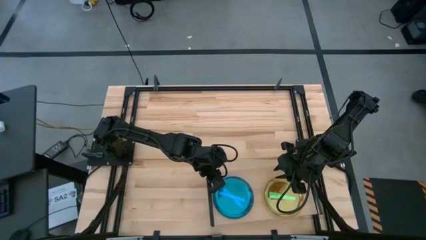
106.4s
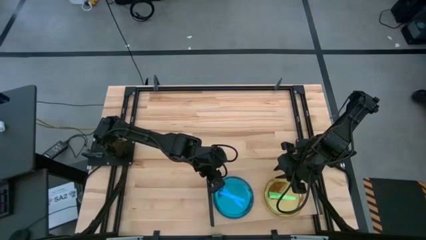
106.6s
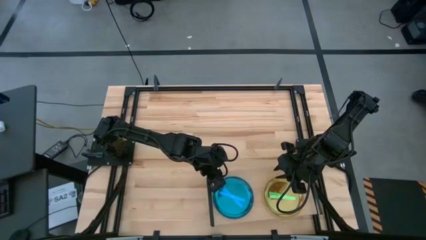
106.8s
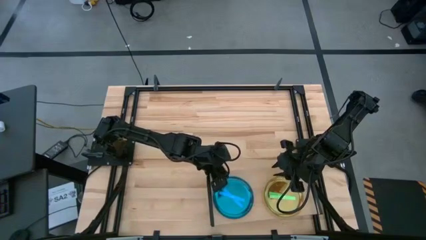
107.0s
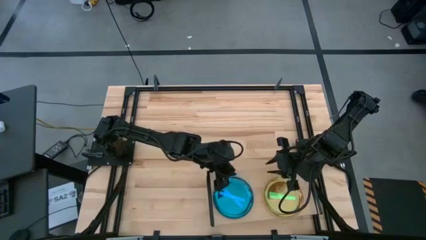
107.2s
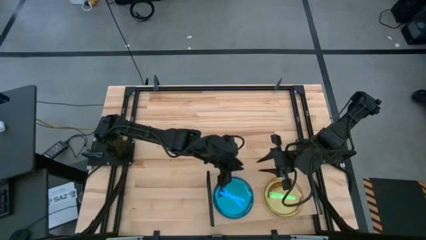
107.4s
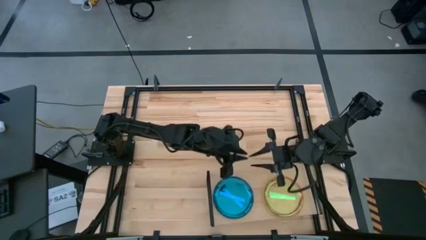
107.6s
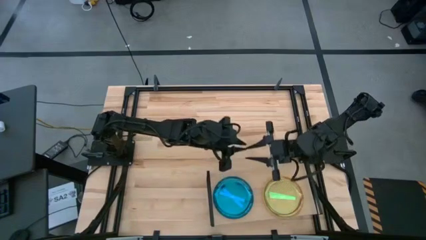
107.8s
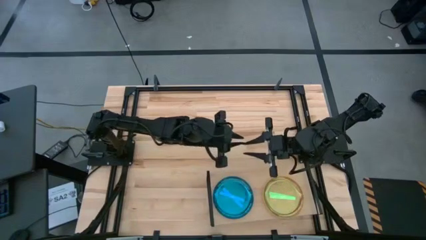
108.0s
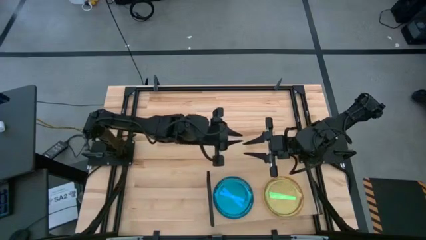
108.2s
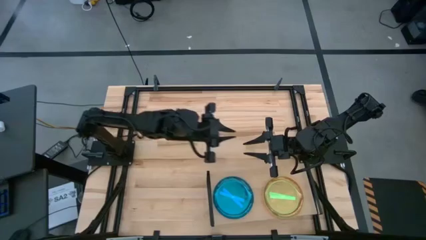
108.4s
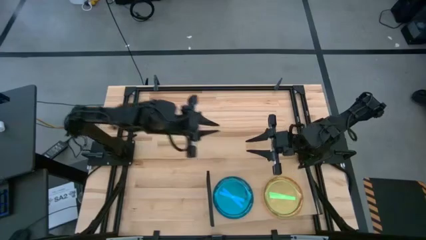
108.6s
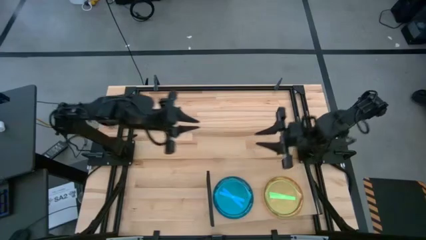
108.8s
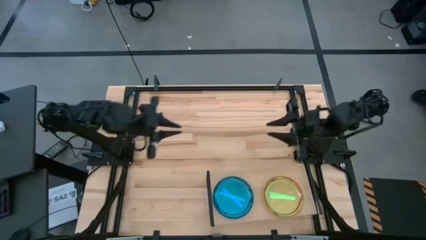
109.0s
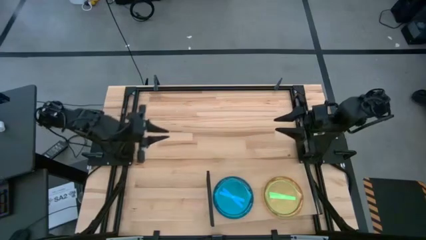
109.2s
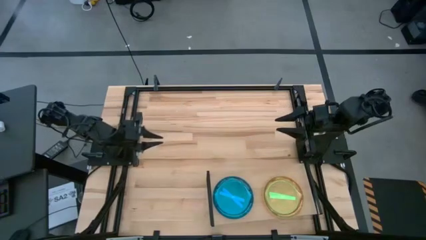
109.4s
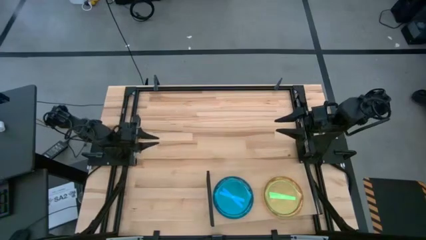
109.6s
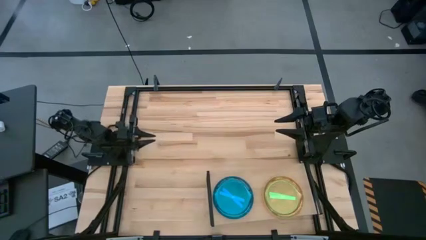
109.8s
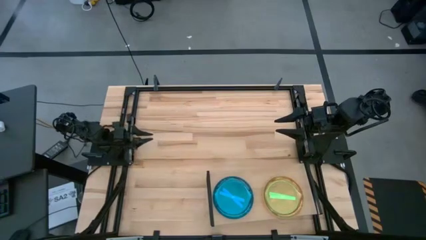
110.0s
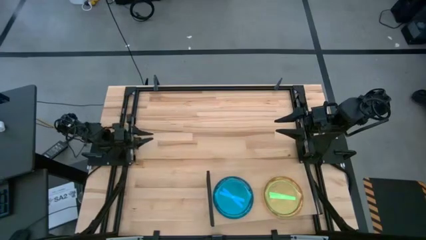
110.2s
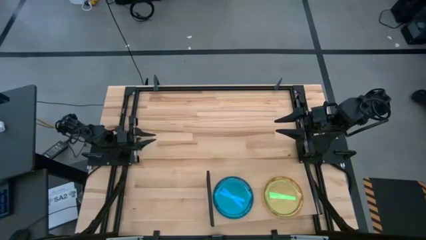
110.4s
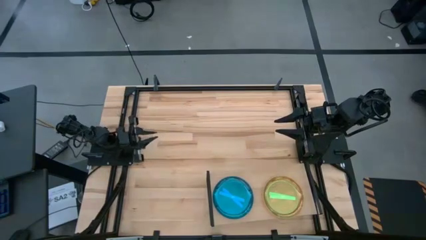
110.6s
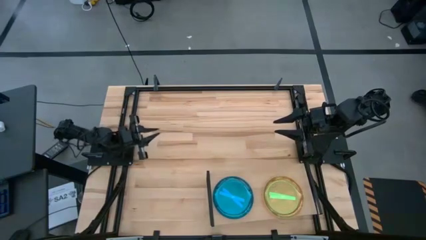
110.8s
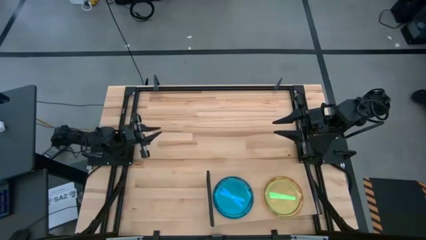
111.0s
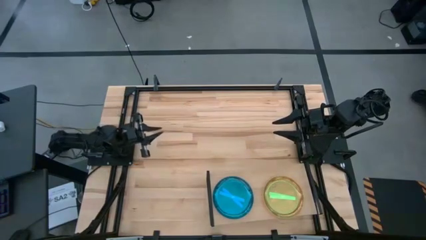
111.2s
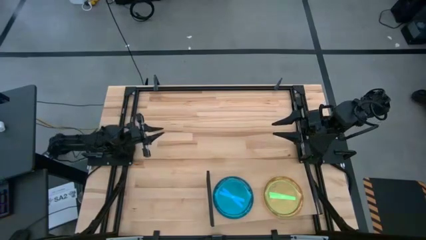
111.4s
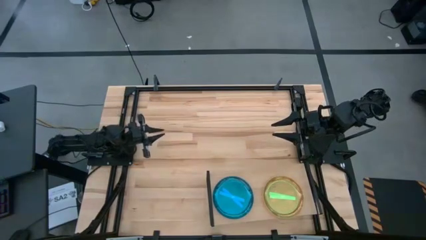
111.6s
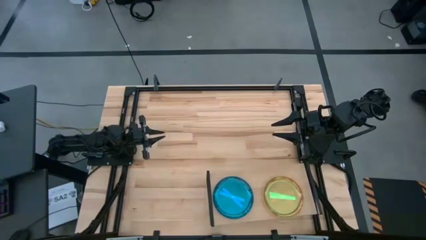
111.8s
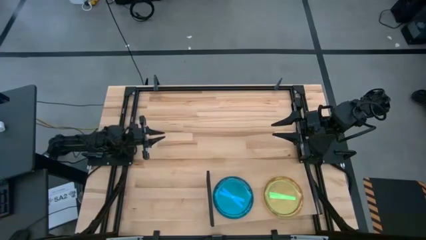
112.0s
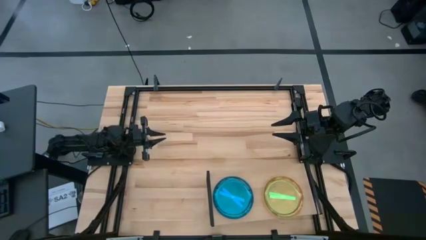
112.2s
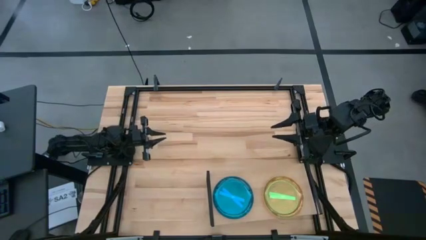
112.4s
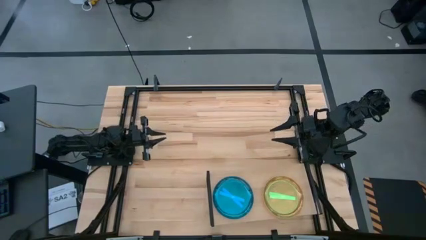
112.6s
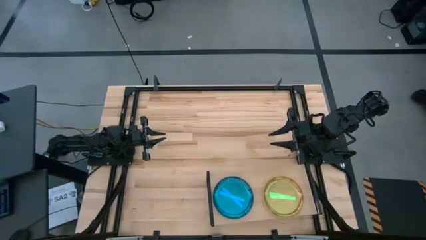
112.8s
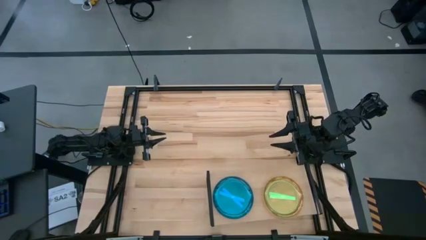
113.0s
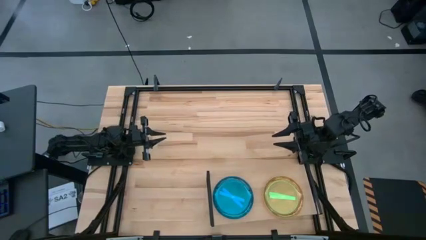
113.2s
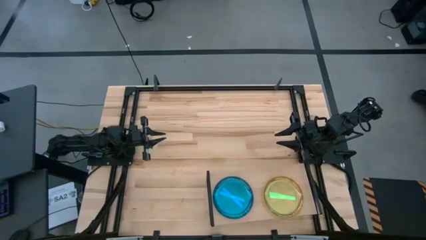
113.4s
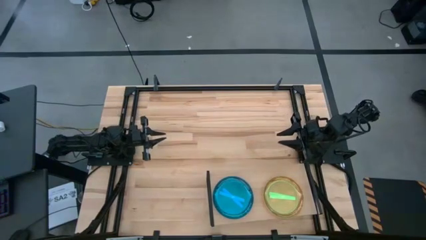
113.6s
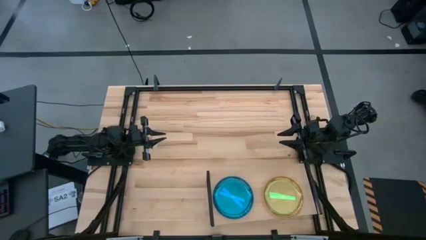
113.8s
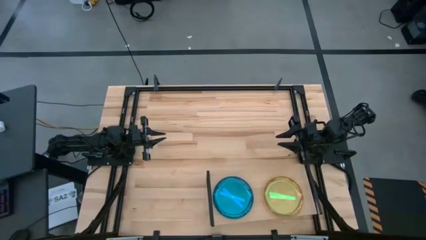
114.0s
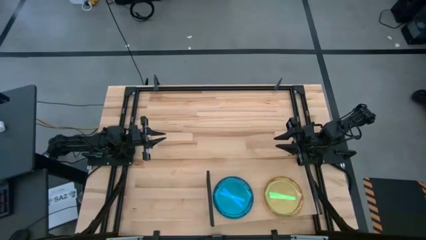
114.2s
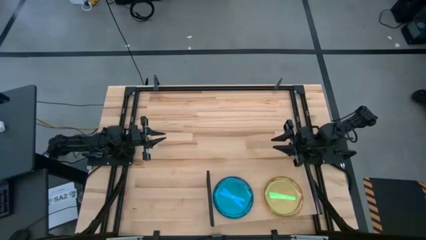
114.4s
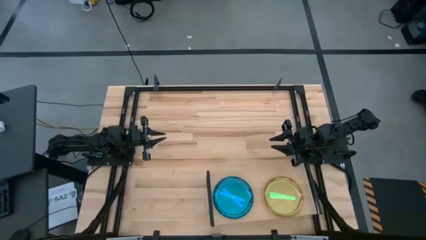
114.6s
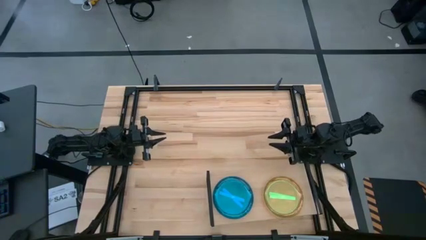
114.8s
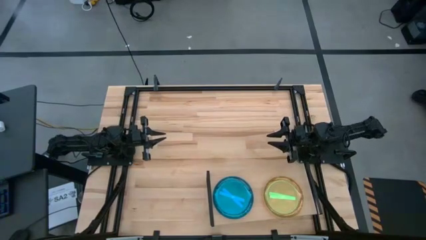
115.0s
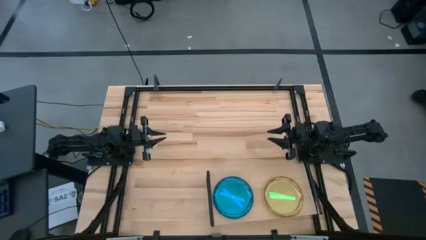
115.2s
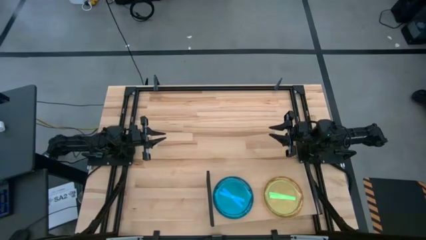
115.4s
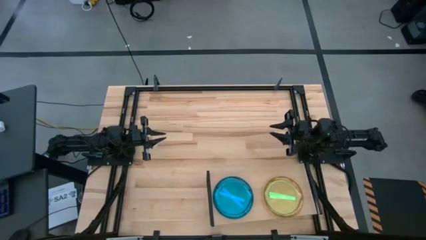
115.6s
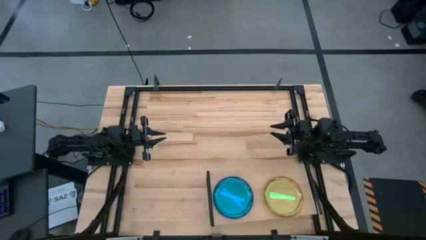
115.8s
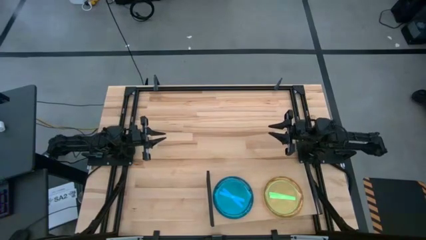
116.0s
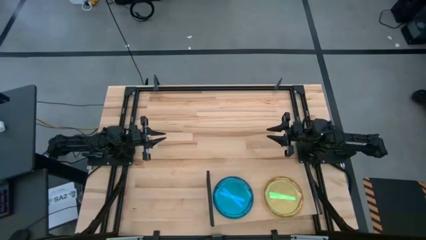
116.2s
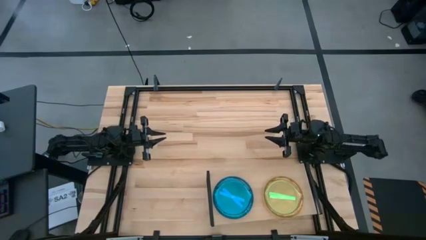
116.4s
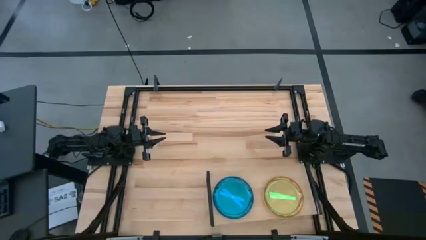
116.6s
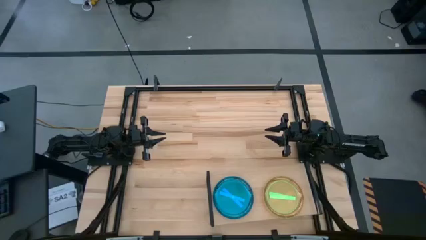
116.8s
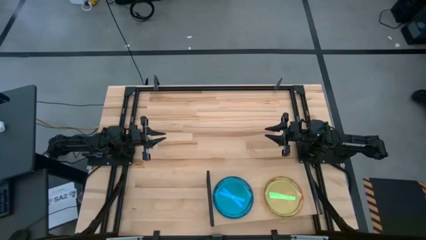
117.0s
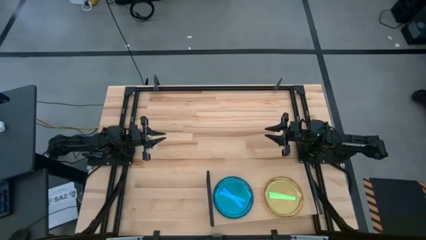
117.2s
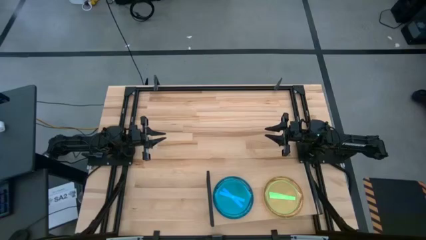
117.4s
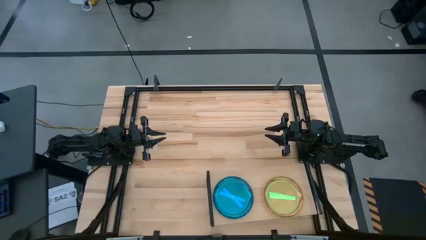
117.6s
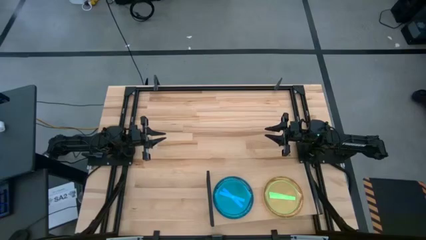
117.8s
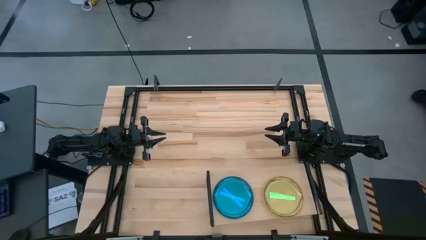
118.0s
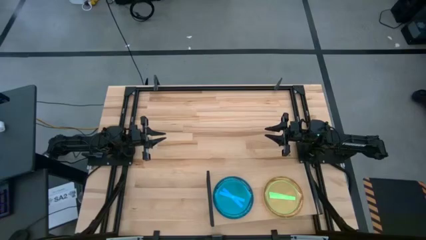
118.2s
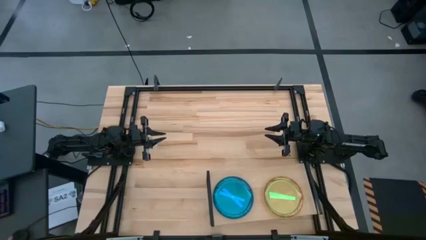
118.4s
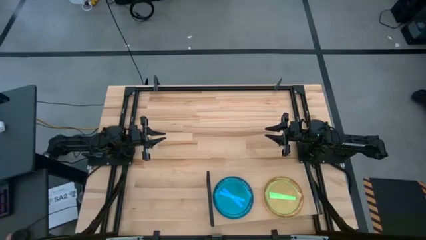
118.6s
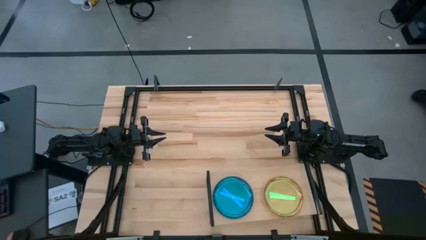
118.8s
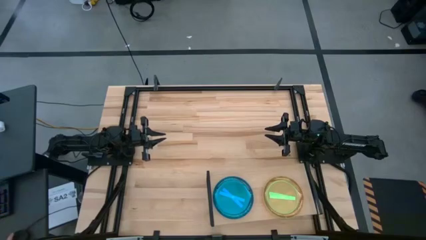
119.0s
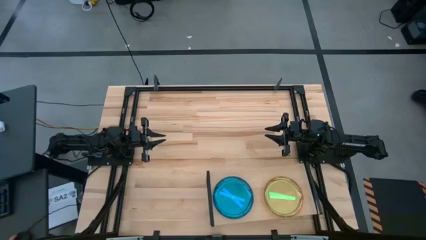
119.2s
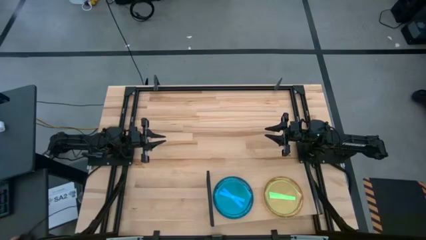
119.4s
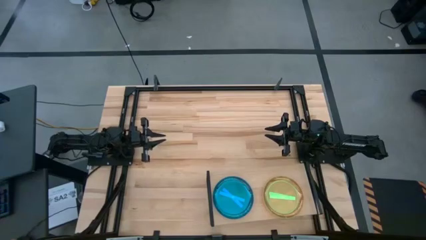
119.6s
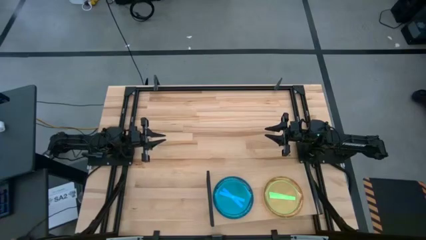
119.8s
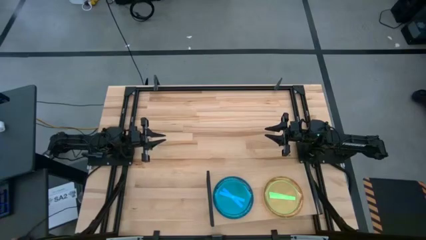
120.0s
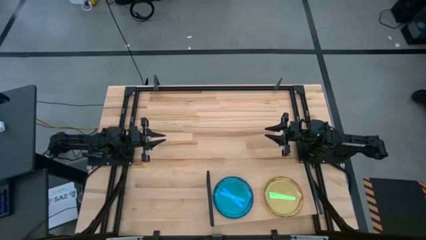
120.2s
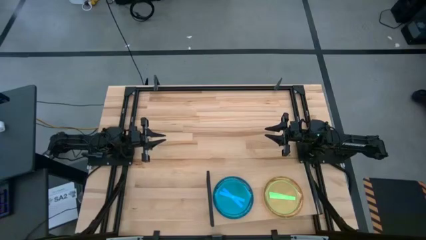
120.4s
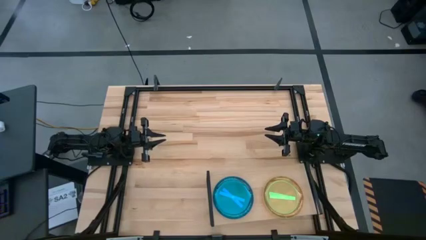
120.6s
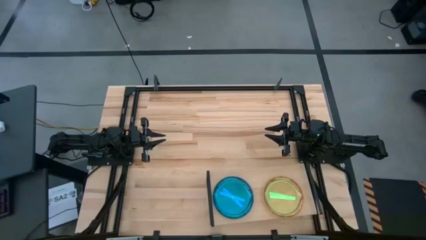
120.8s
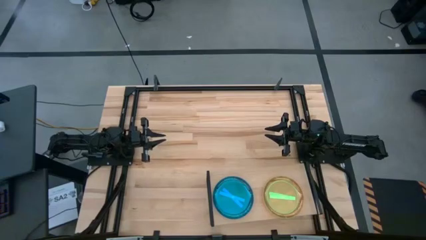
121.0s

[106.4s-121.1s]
Task: Place and stack plates onto a shelf
Return to Home Position
